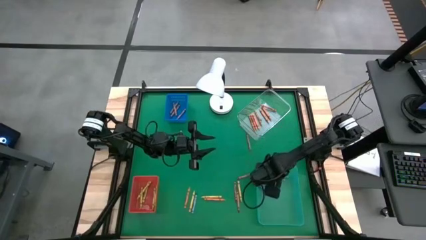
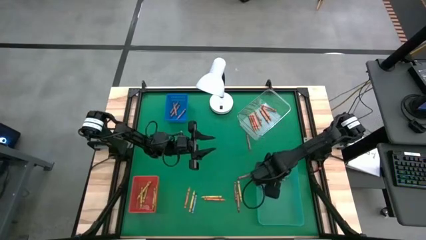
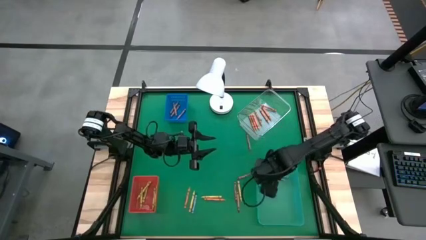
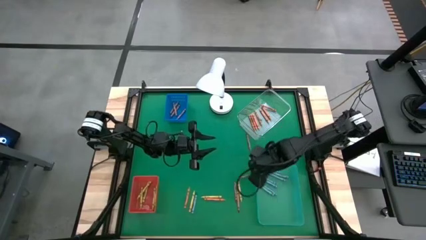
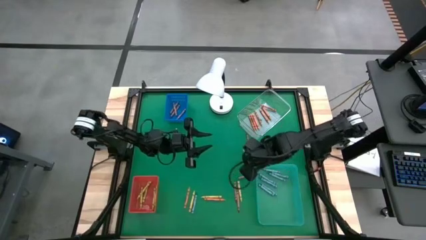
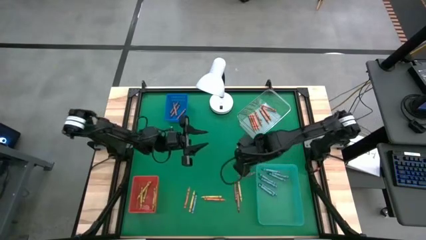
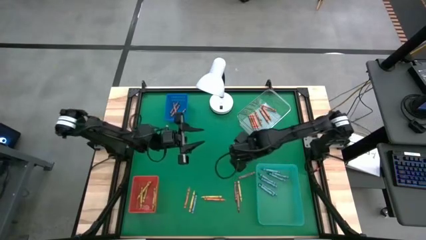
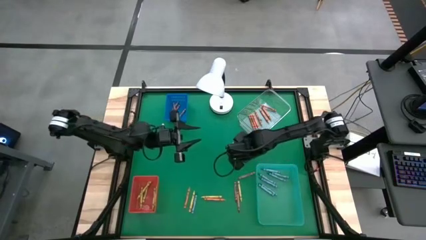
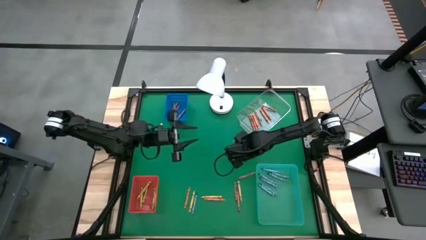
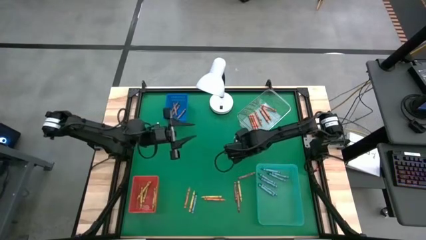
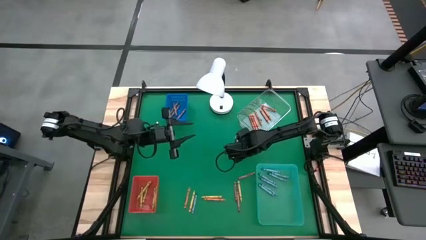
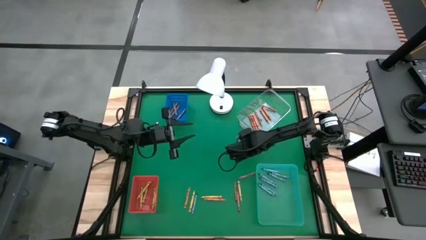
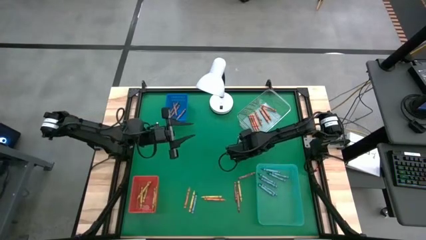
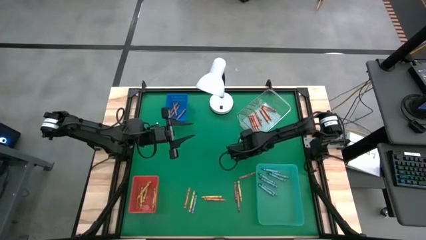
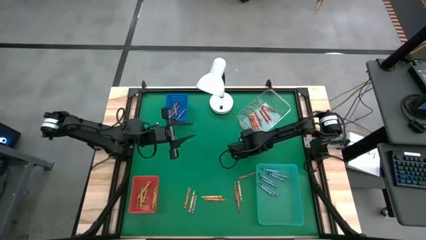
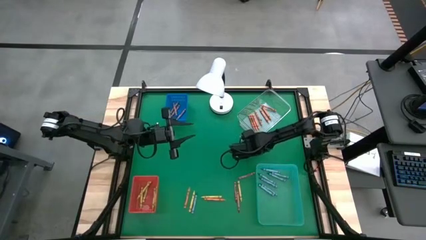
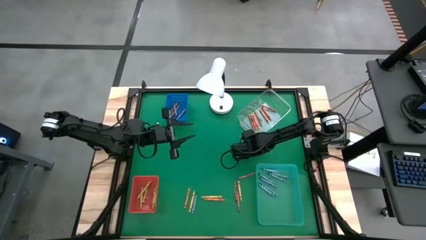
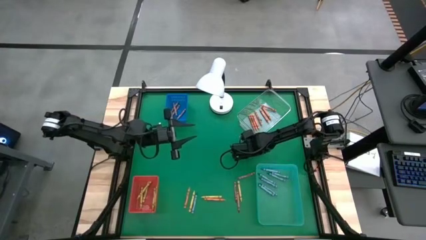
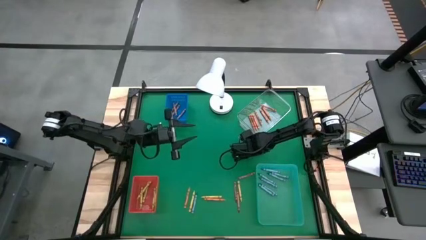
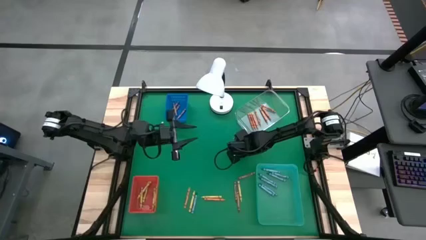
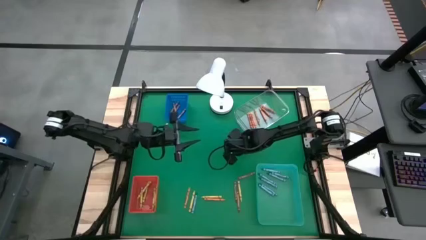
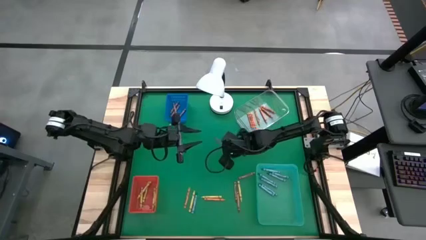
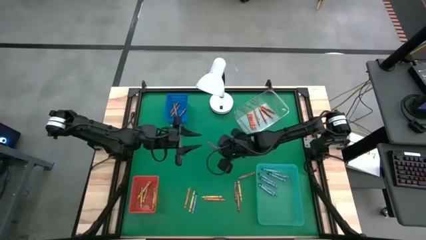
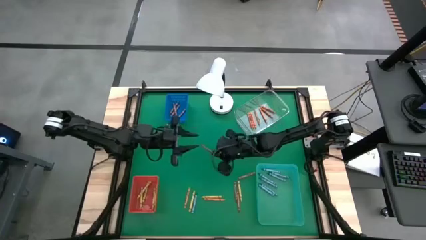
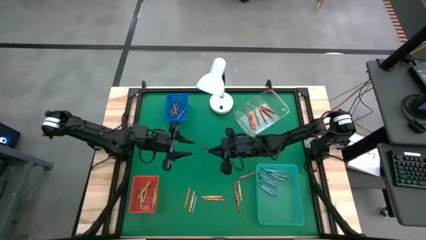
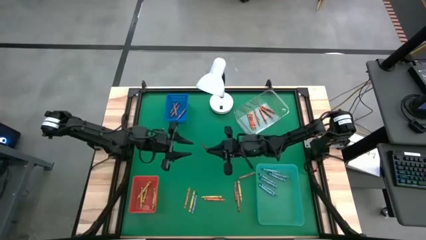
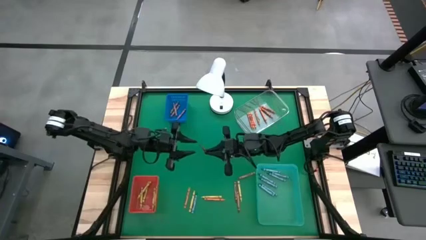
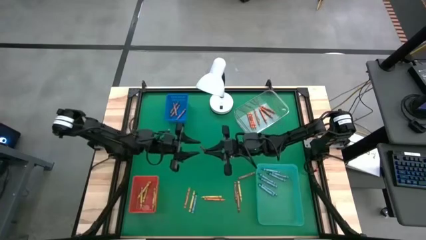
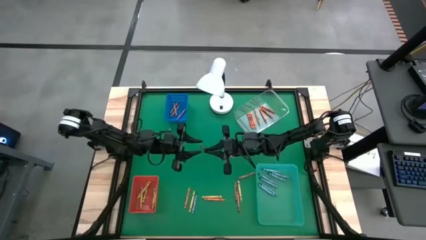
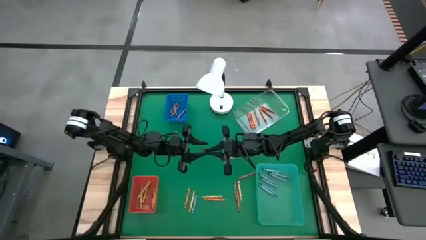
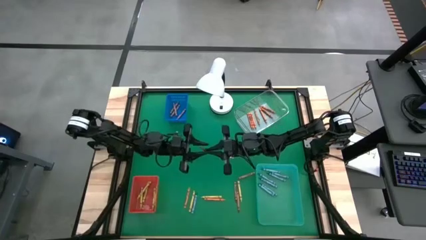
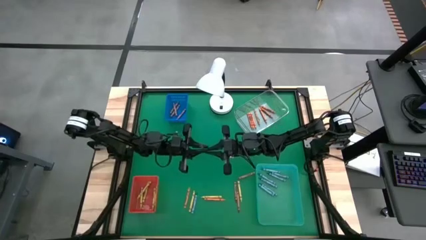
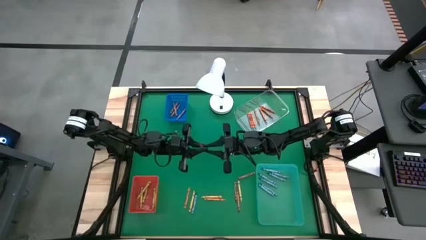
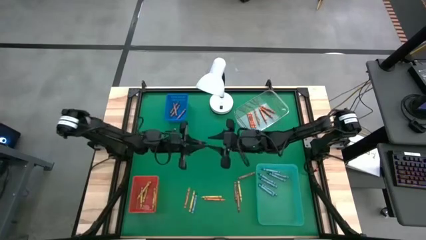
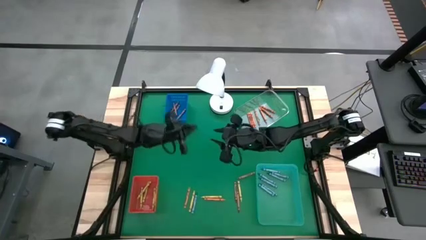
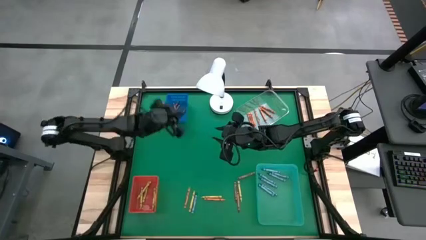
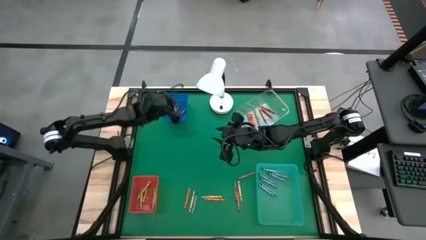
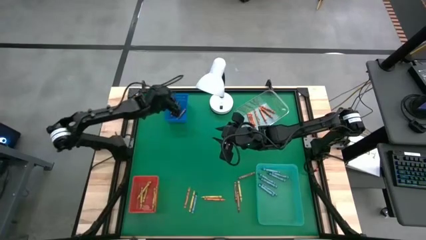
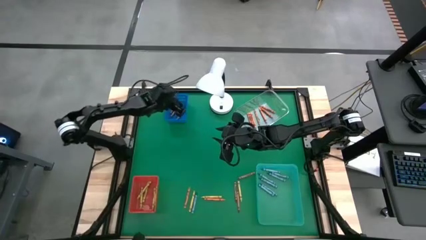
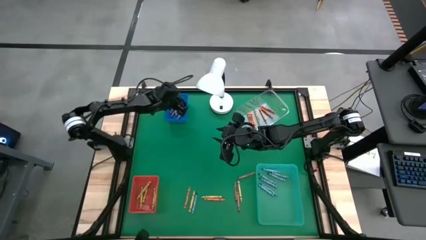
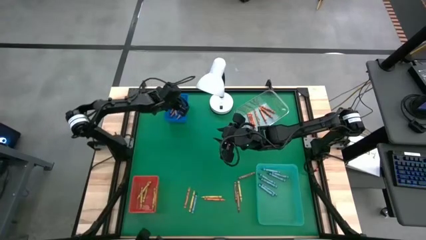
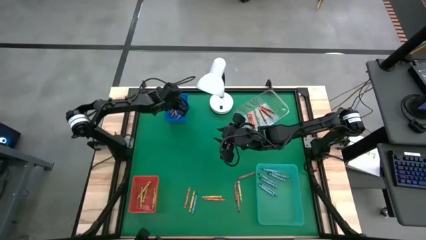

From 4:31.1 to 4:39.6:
Task: Sort crayons
Put the brown crayon into the blue bin

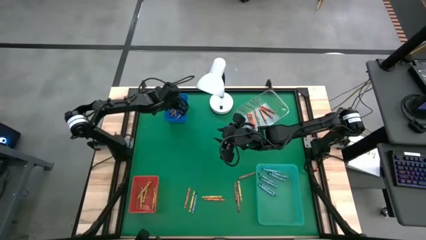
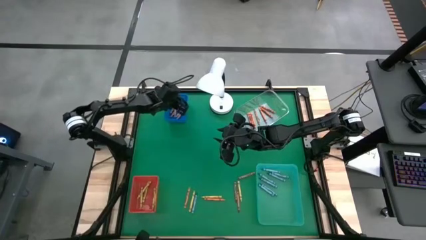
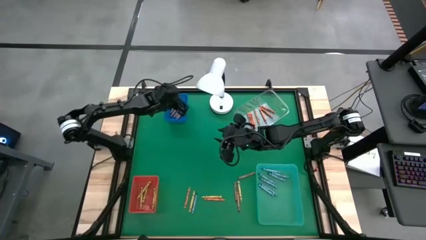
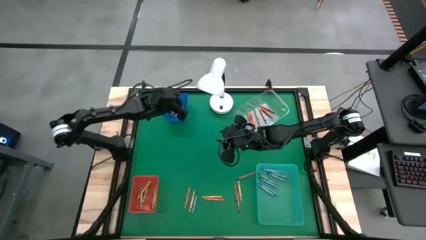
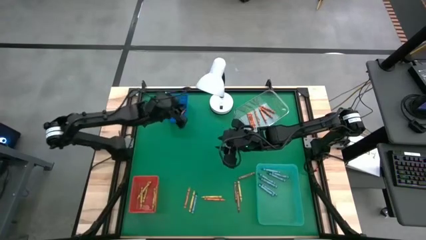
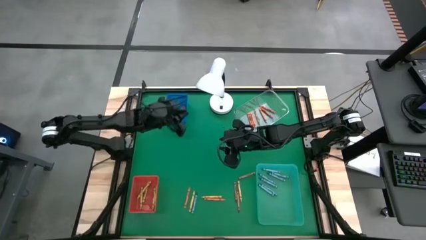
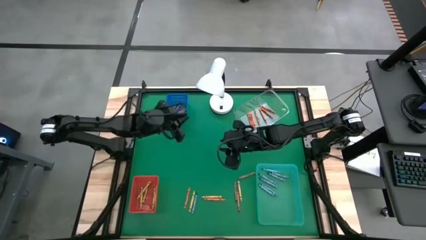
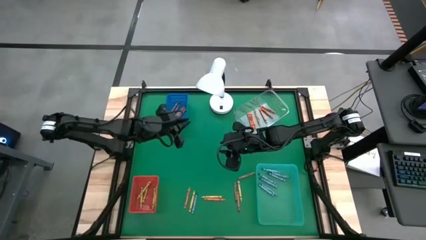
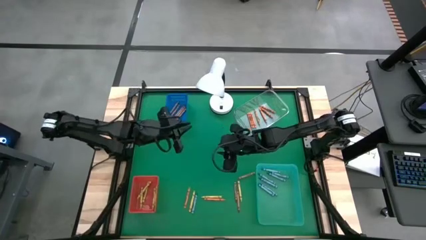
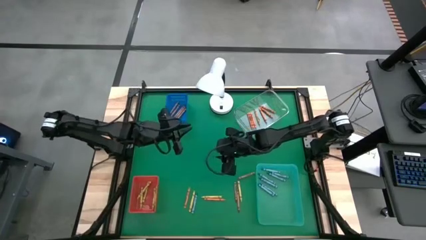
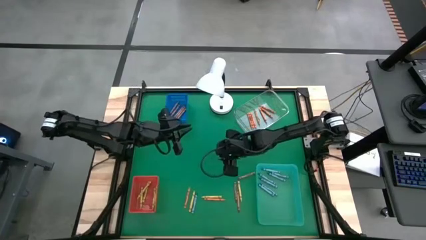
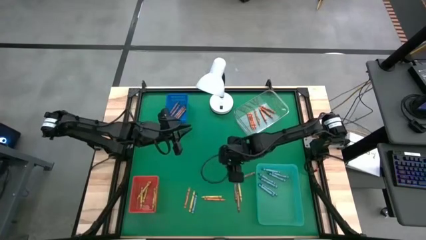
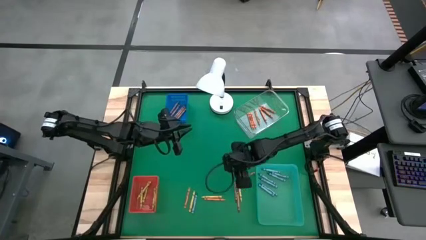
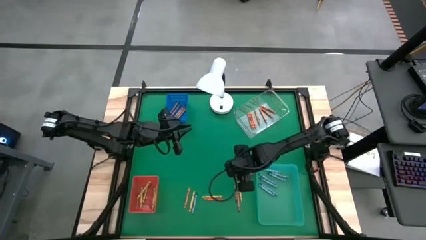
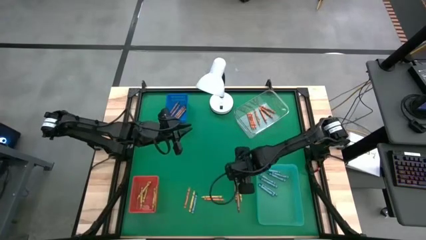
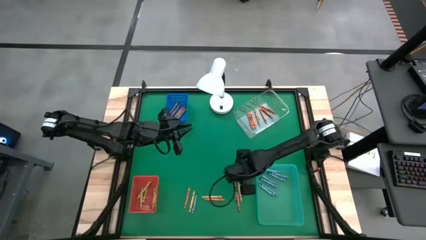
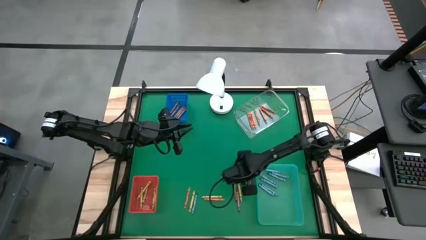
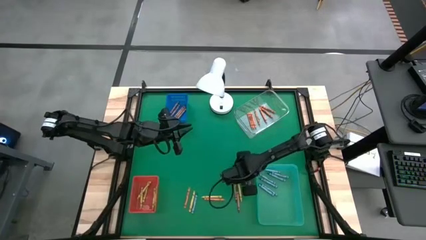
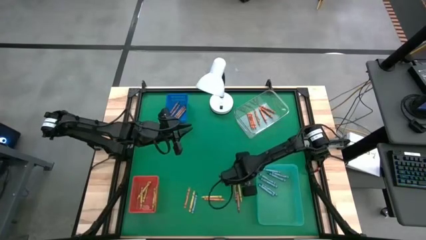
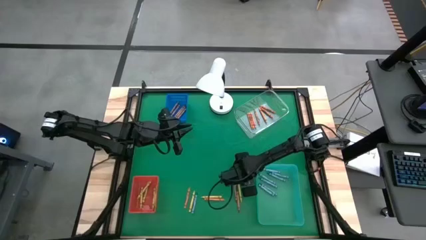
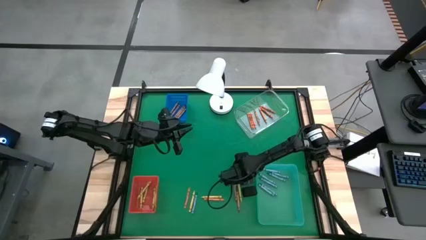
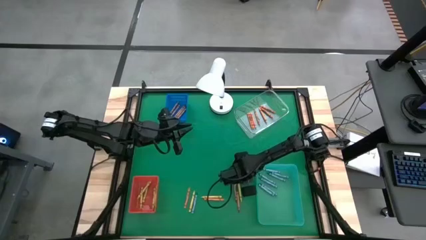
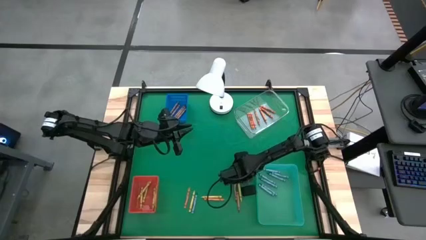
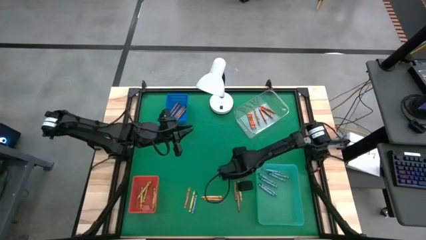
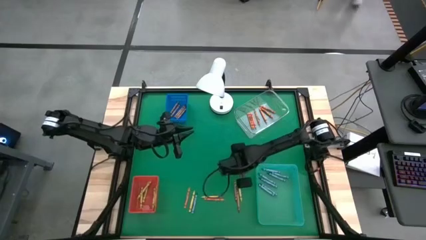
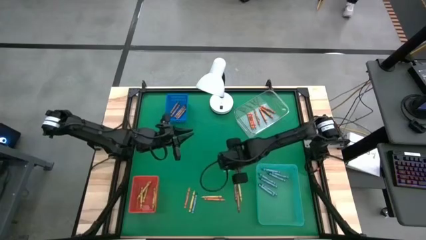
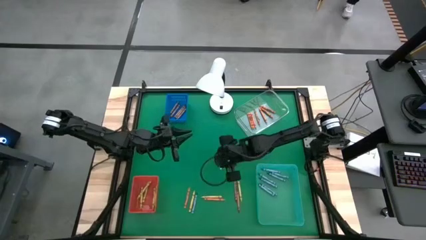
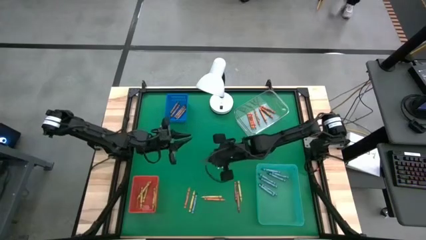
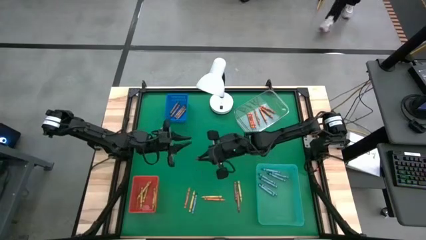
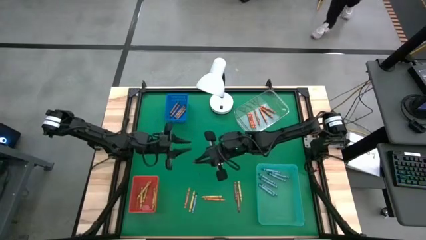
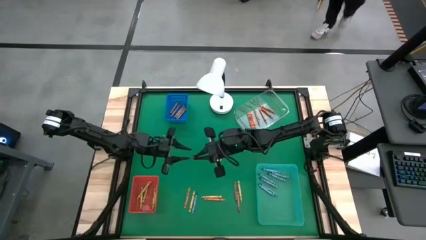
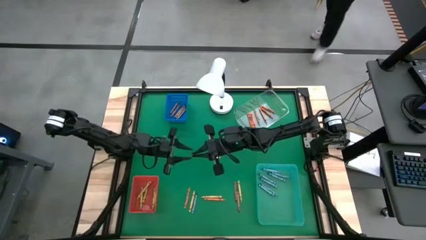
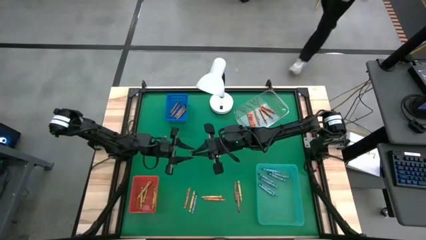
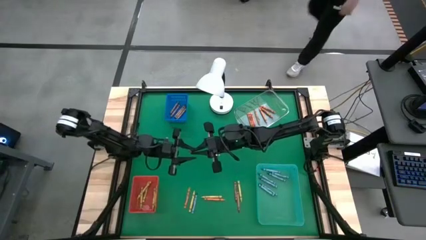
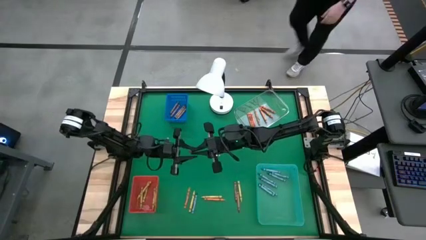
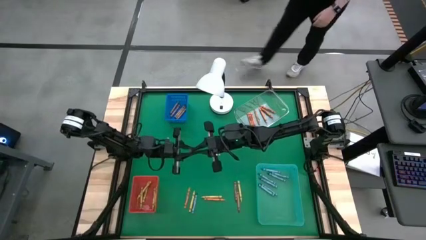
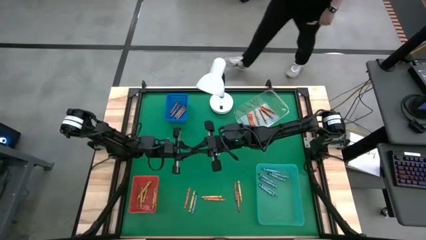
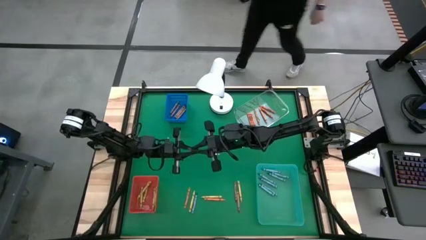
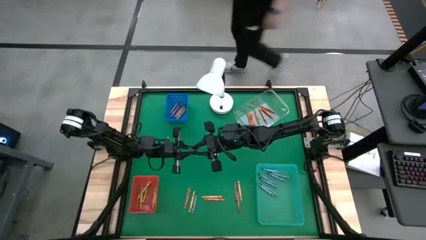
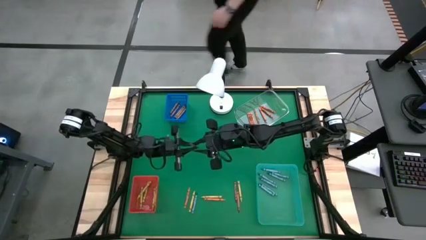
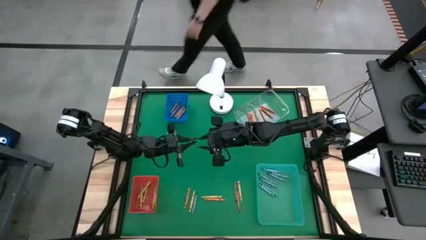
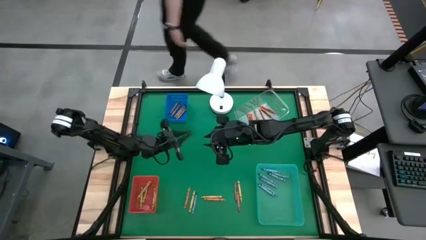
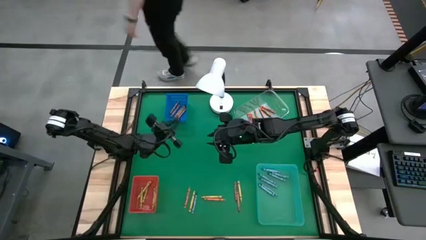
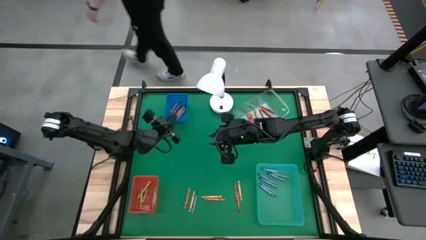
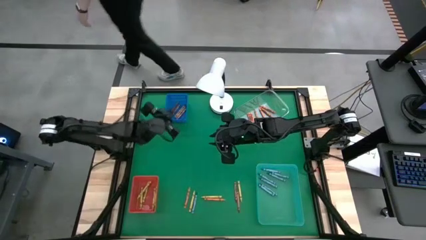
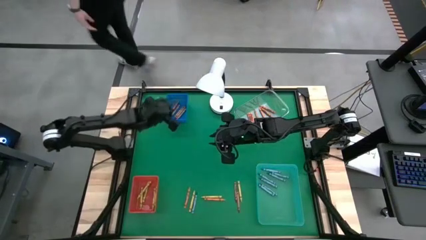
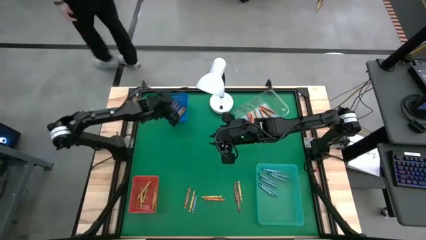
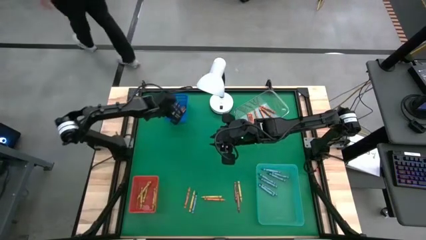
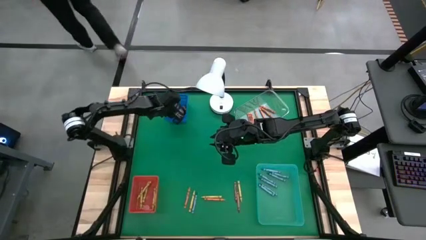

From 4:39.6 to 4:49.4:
Put the brown crayon into the blue bin
